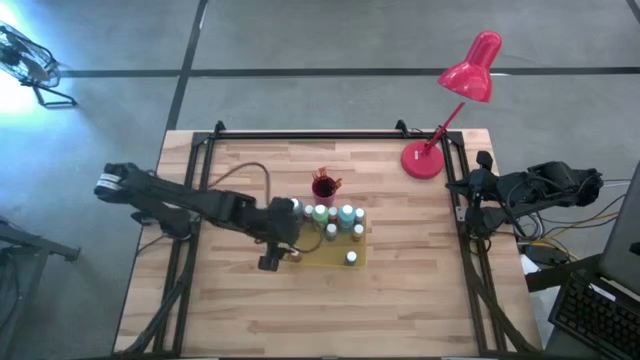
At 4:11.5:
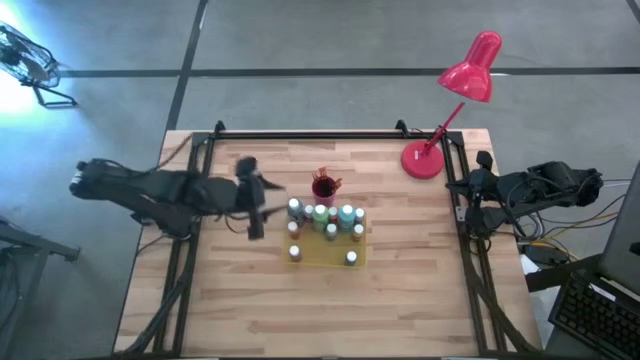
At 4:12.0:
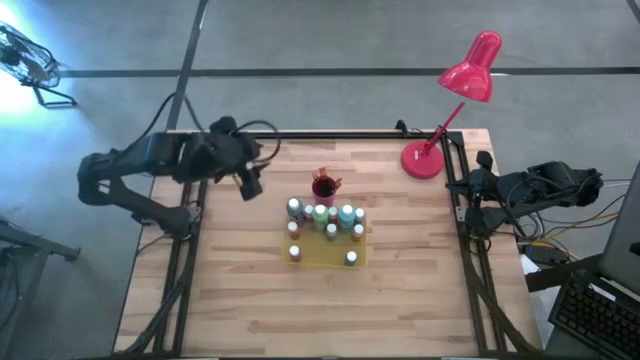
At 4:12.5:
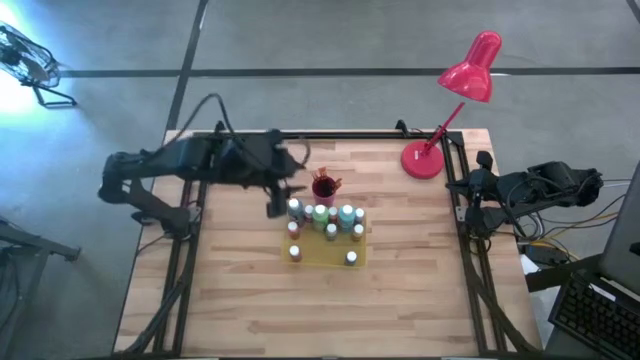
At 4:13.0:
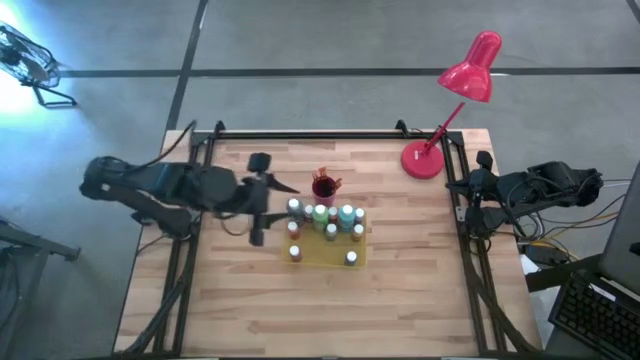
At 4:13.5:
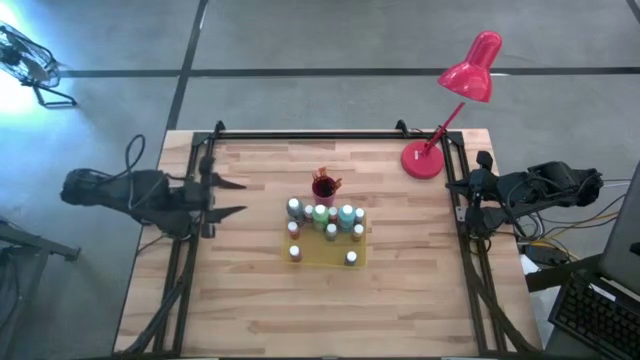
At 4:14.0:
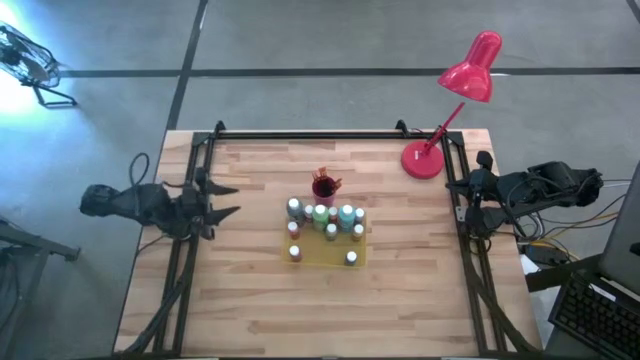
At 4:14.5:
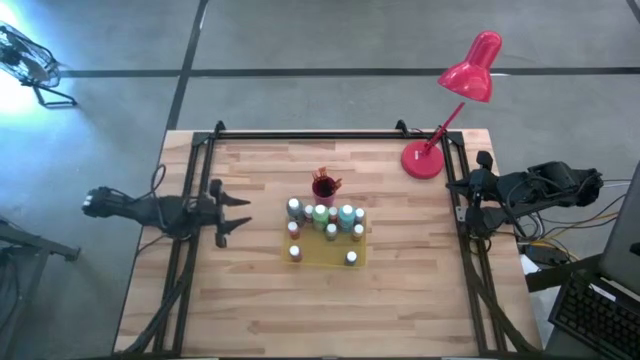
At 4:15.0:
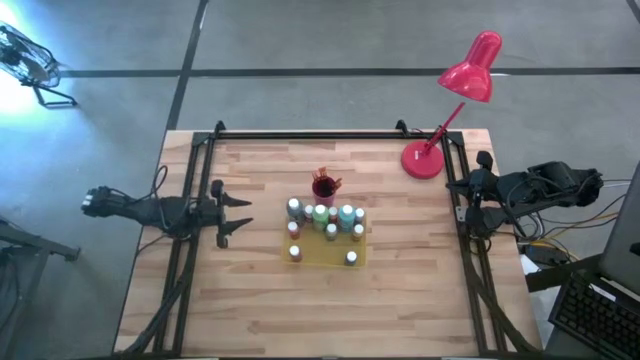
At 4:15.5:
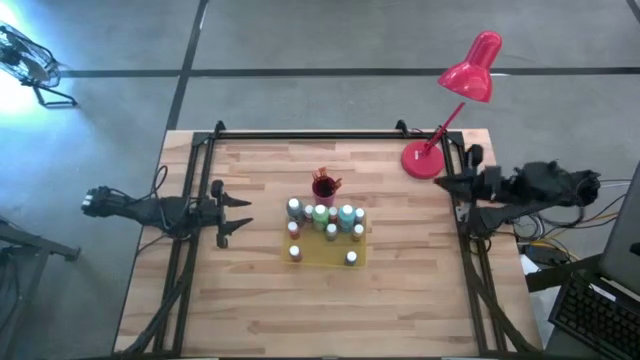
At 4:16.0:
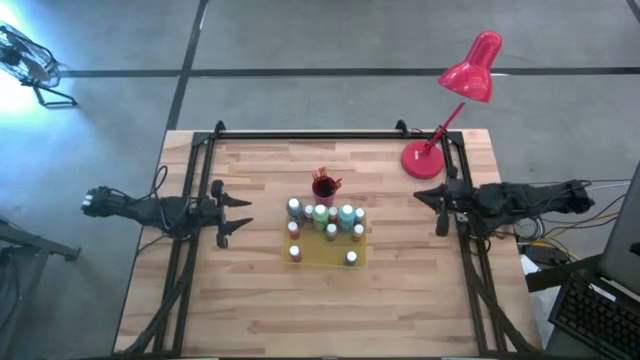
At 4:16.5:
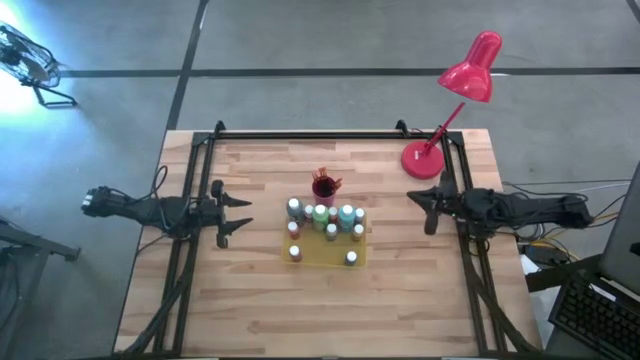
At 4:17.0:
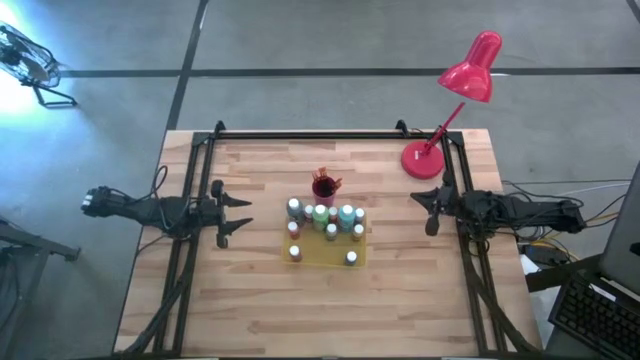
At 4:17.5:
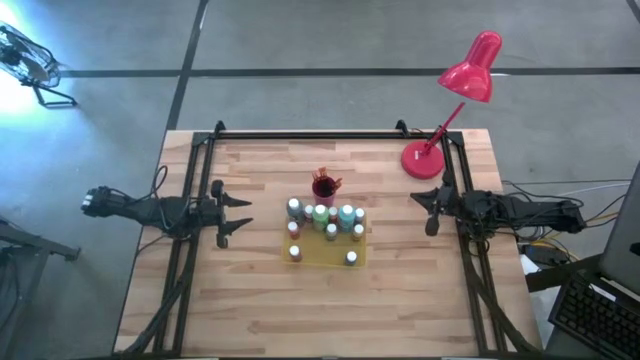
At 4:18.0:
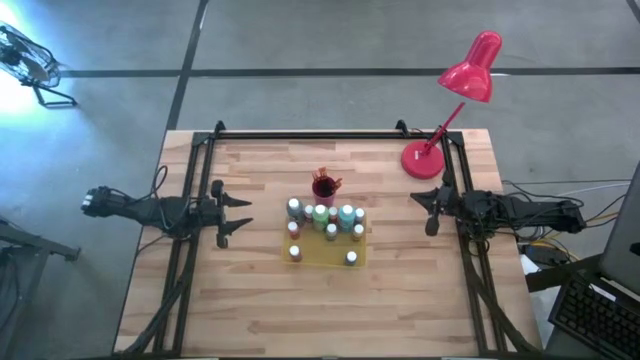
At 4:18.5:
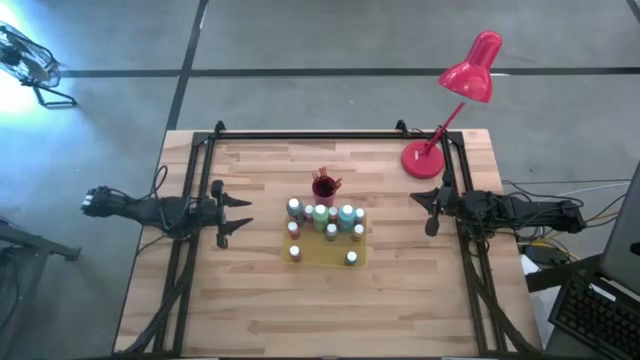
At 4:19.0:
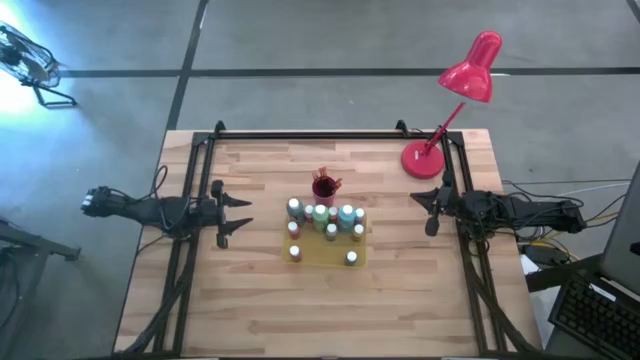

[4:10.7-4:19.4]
Task: Pick & Place Paint Supplies
Return to Home Position

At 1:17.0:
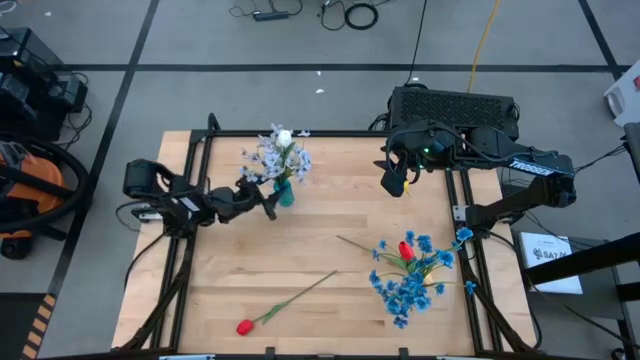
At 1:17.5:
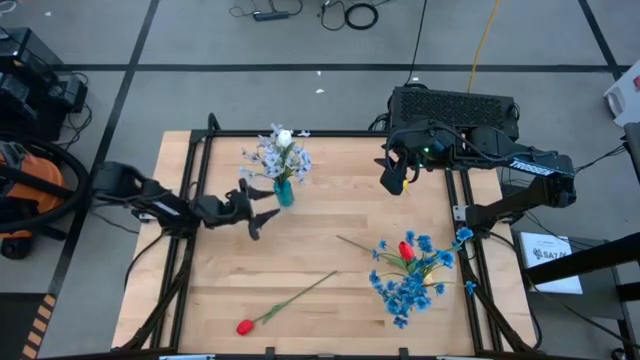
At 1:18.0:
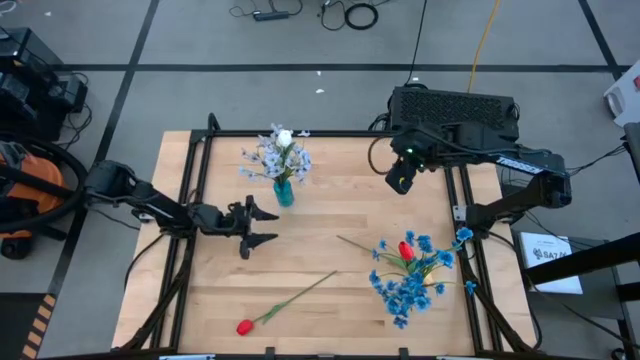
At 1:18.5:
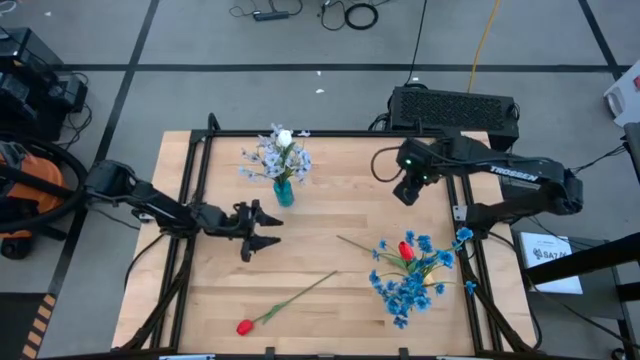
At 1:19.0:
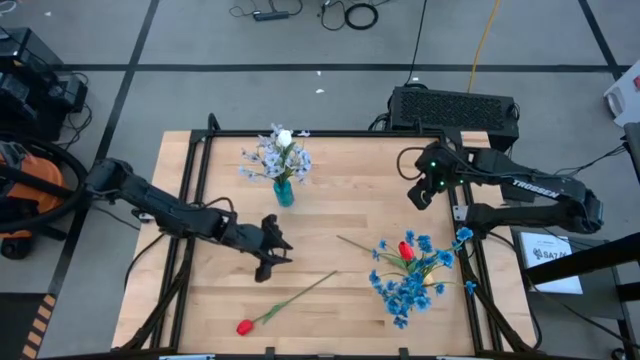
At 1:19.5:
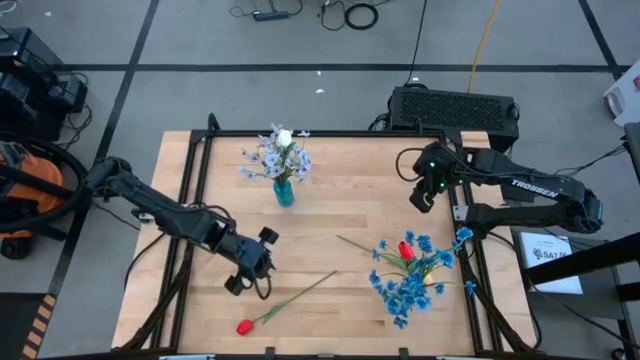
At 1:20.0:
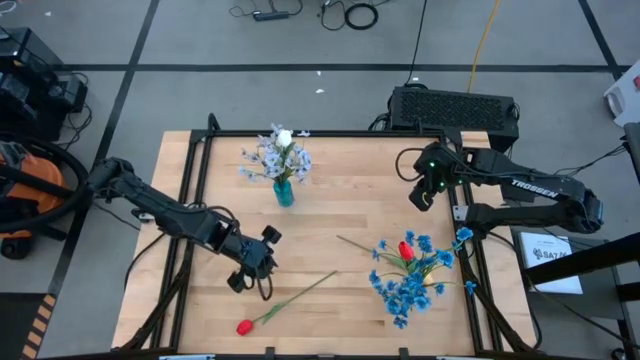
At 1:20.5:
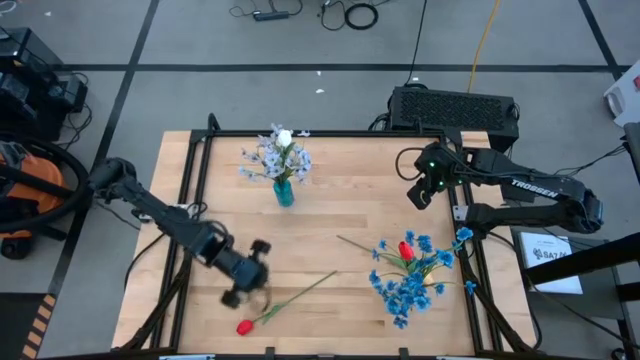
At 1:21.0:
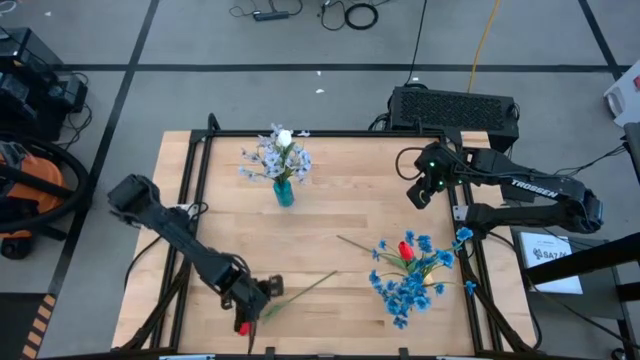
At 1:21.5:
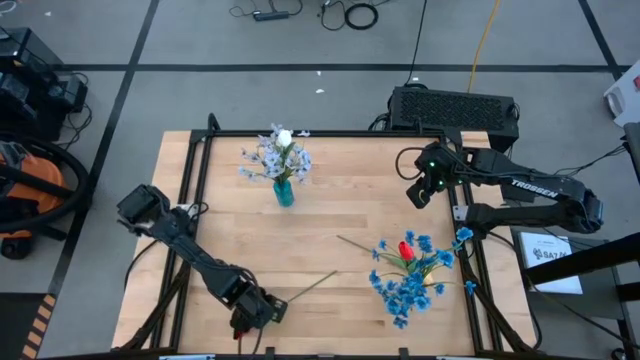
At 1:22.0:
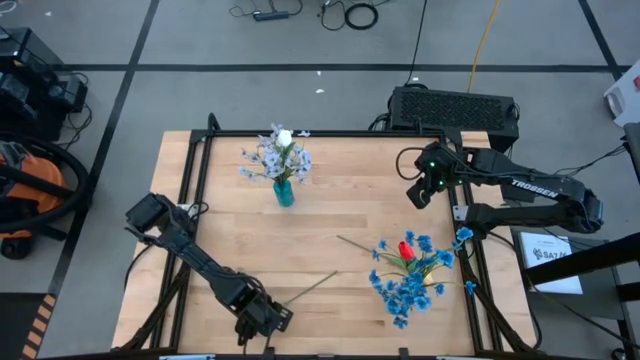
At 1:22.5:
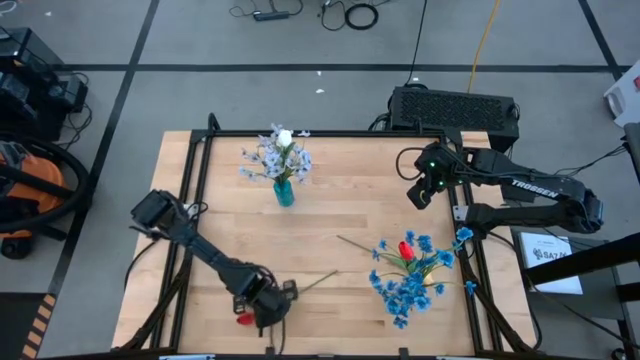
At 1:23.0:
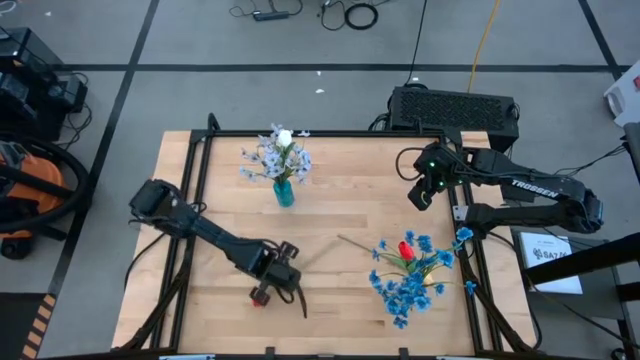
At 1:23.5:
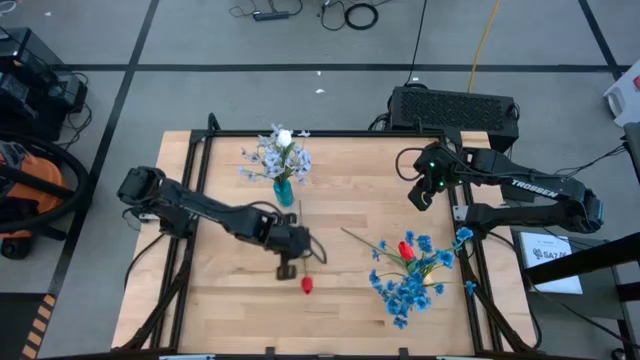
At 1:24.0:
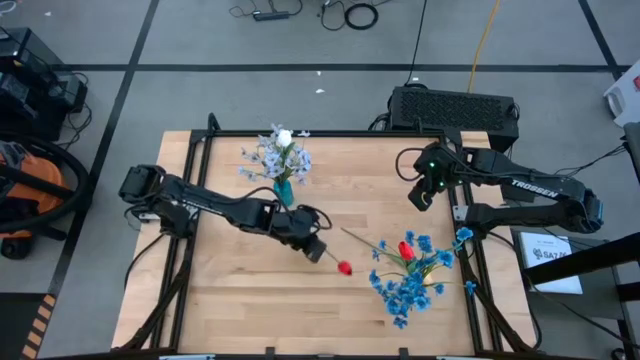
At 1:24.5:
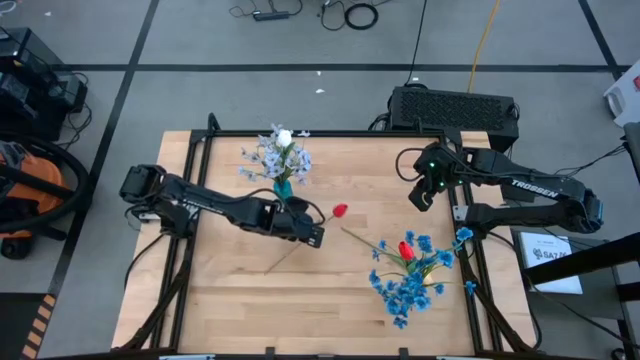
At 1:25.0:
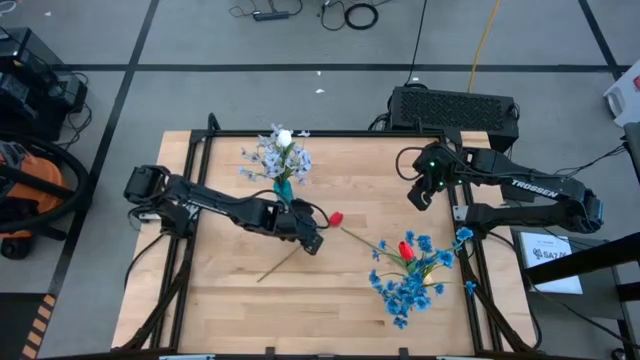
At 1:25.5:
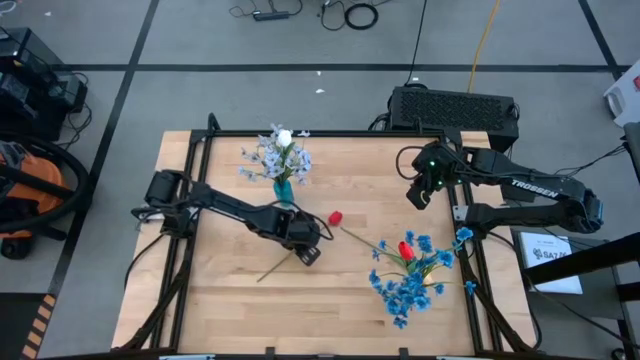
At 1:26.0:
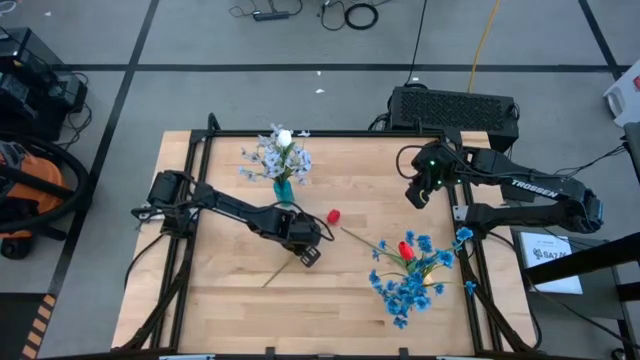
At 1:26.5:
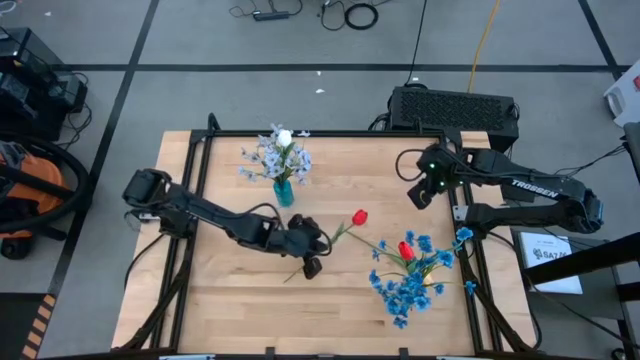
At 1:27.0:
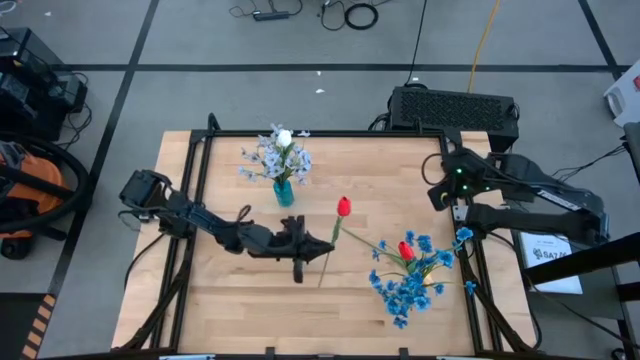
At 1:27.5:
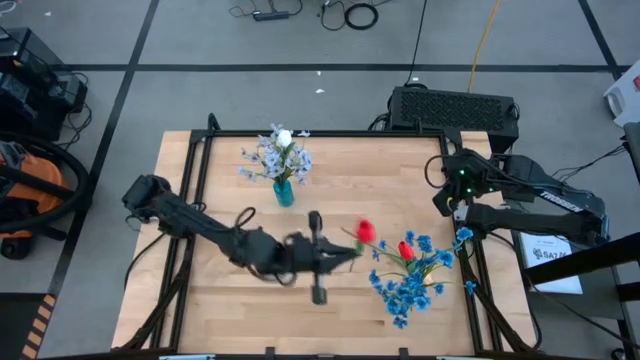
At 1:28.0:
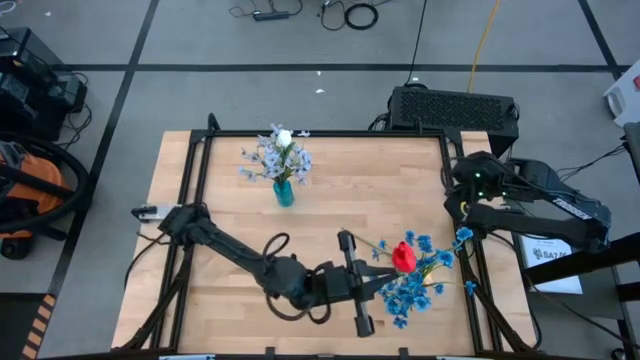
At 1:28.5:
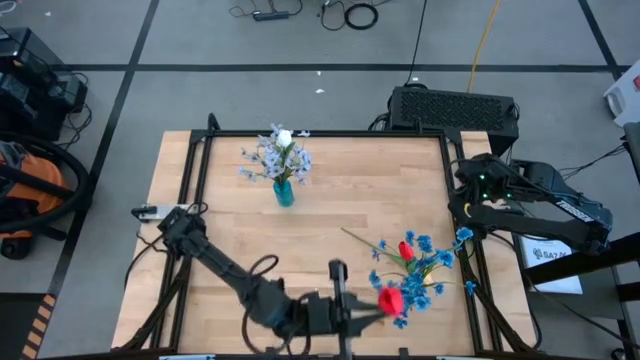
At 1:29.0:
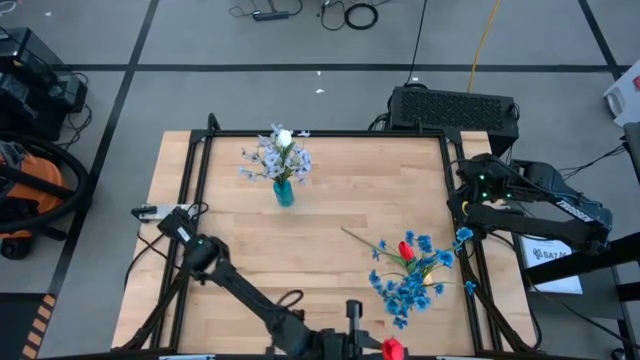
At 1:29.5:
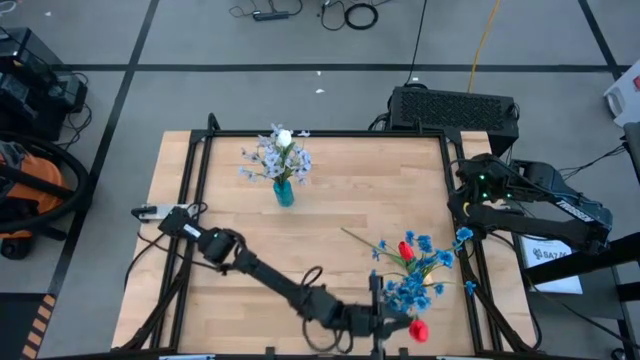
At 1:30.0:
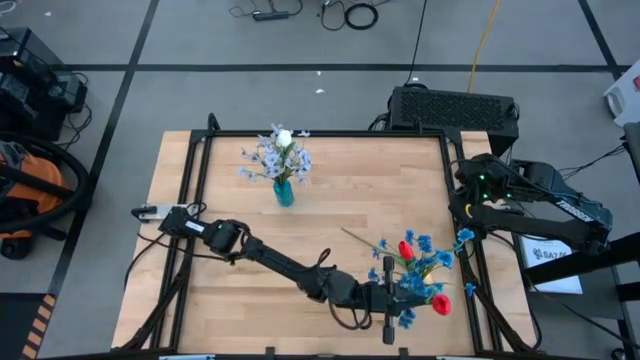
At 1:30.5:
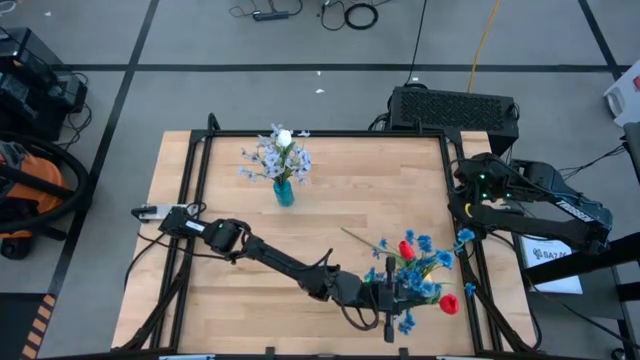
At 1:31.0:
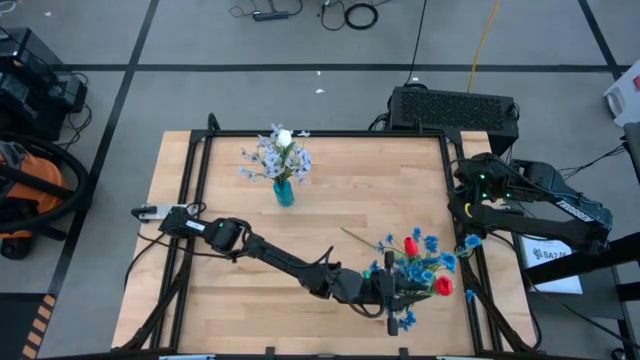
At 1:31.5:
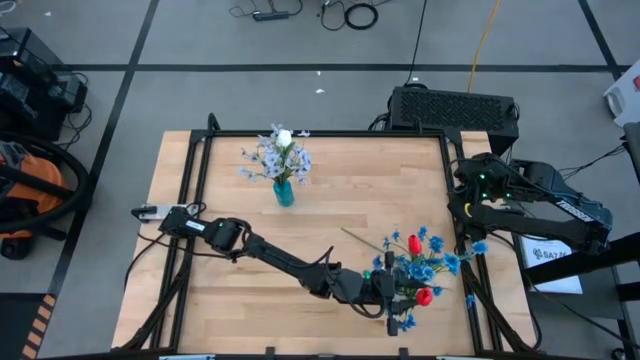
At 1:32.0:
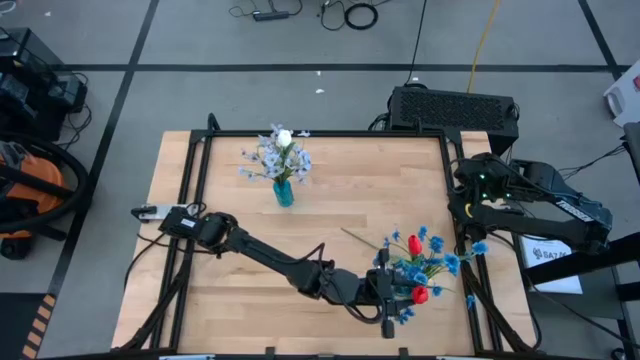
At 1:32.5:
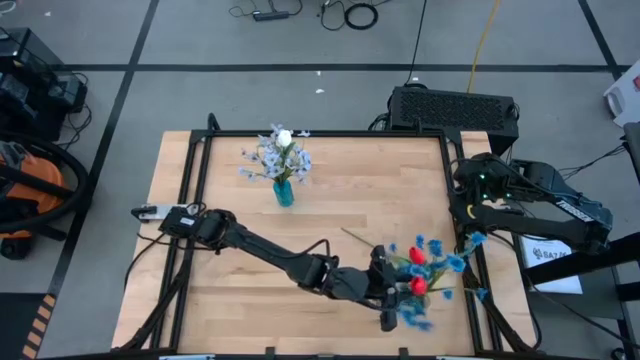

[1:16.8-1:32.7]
Task: Sort flowers into vase by color
Put the red tulip into the transparent vase
